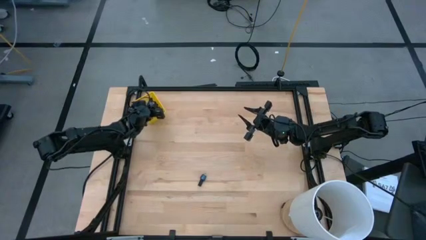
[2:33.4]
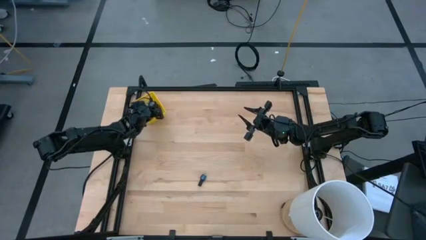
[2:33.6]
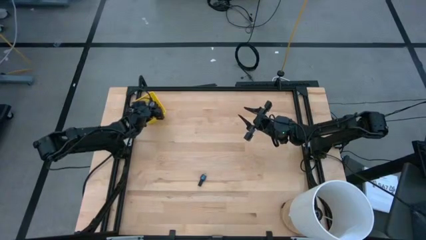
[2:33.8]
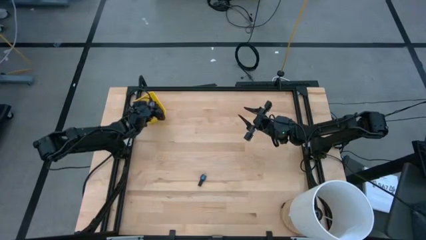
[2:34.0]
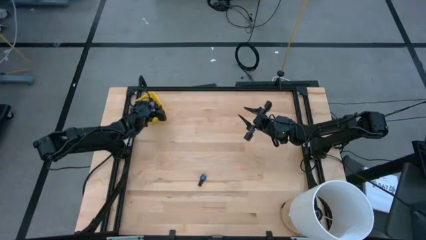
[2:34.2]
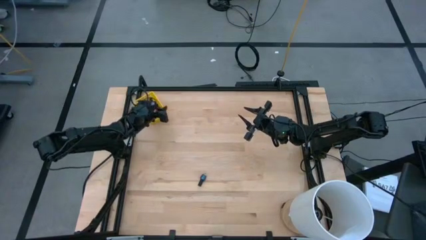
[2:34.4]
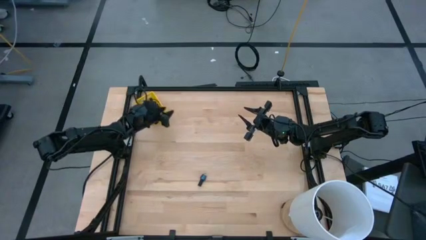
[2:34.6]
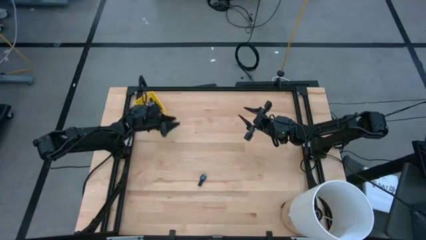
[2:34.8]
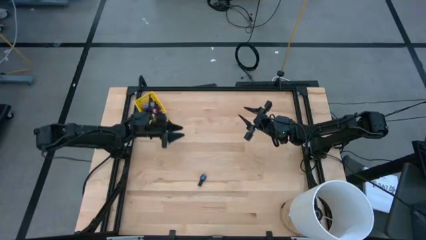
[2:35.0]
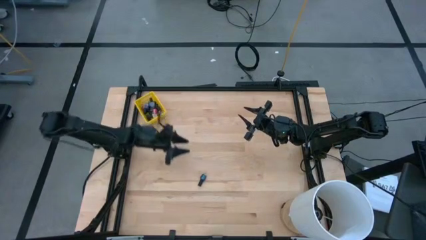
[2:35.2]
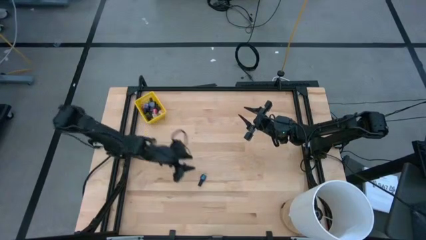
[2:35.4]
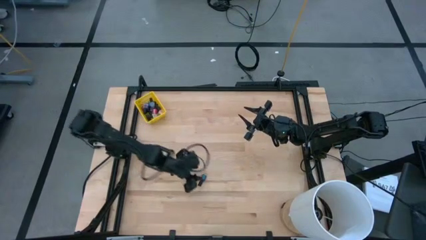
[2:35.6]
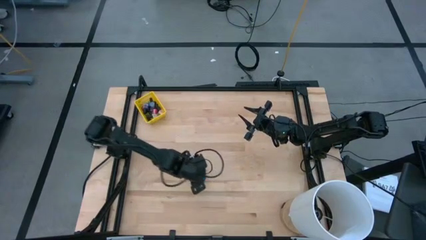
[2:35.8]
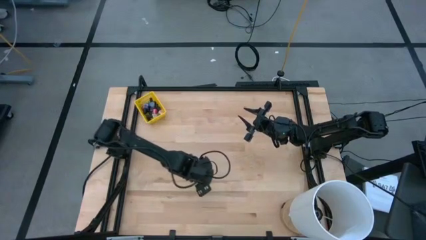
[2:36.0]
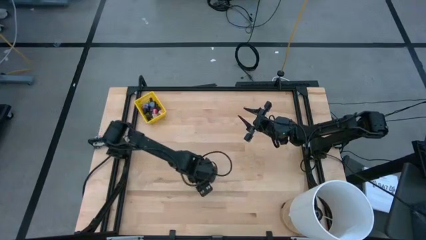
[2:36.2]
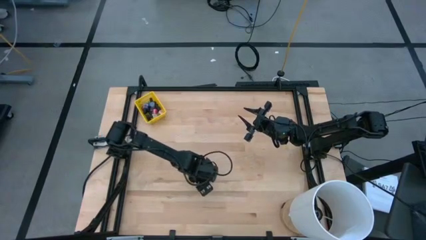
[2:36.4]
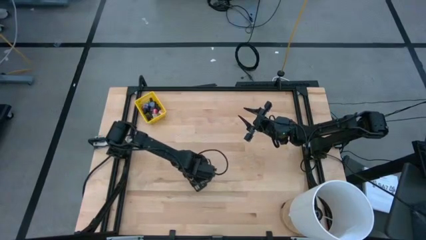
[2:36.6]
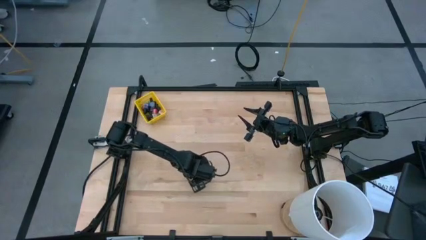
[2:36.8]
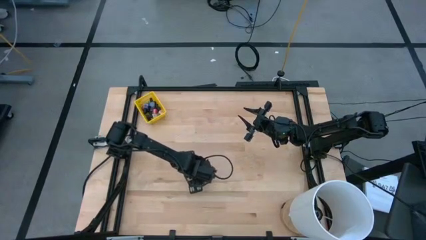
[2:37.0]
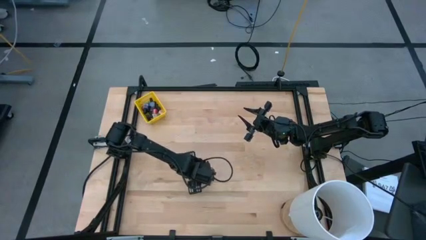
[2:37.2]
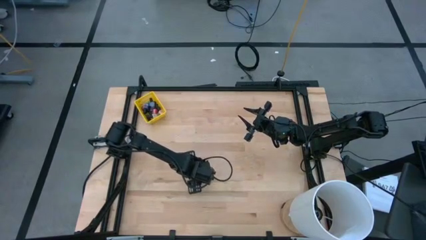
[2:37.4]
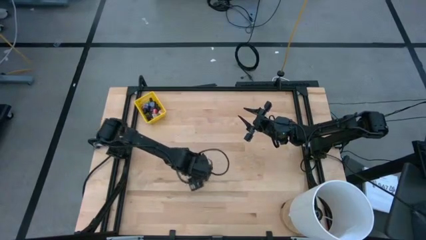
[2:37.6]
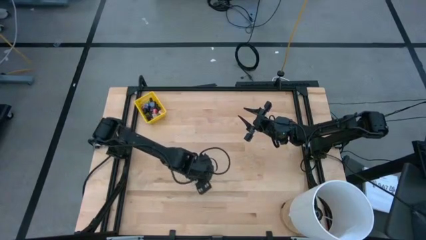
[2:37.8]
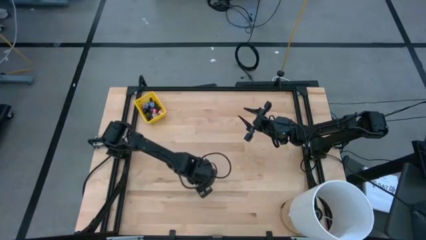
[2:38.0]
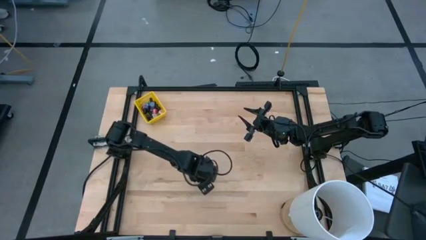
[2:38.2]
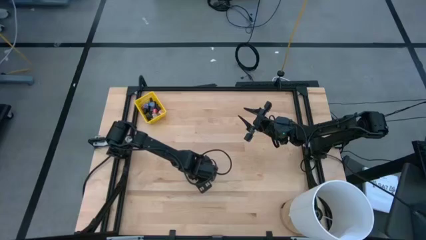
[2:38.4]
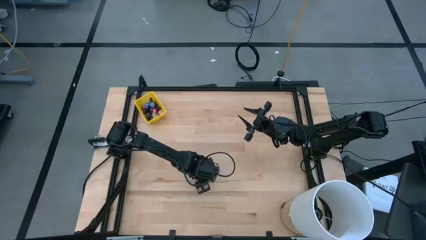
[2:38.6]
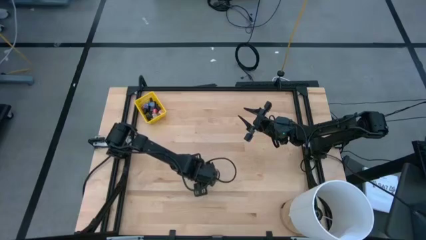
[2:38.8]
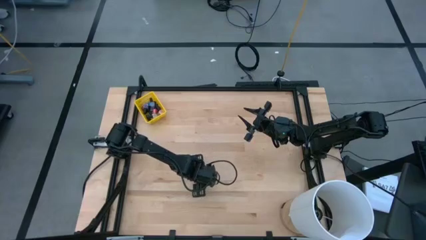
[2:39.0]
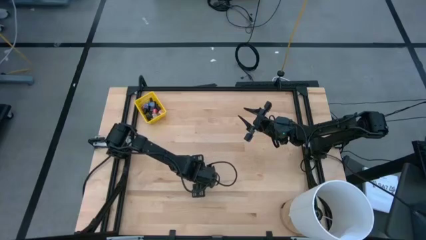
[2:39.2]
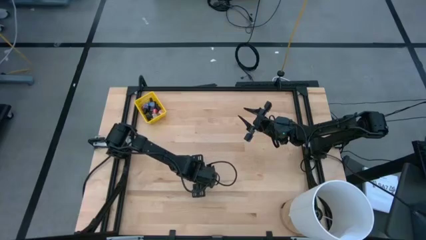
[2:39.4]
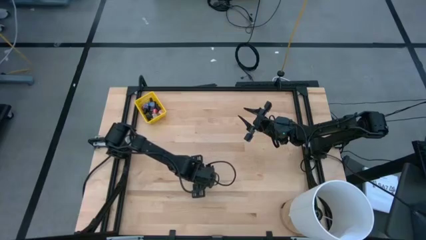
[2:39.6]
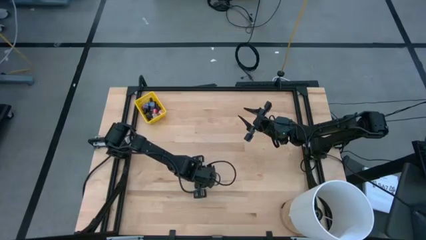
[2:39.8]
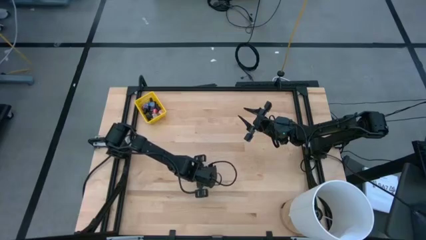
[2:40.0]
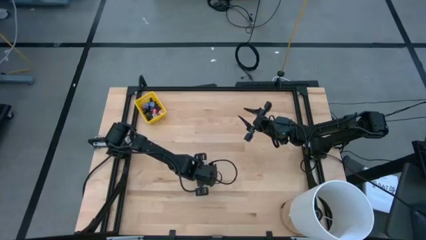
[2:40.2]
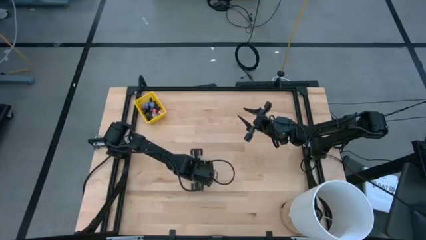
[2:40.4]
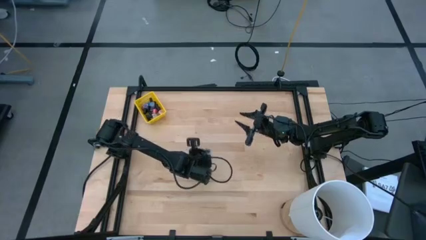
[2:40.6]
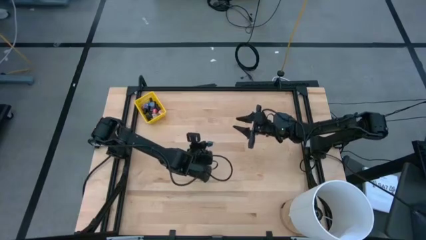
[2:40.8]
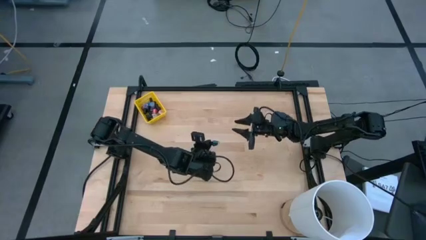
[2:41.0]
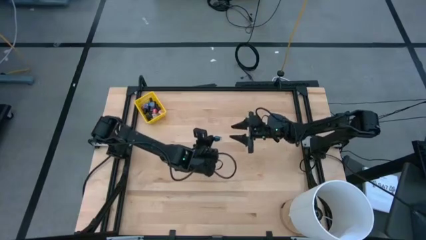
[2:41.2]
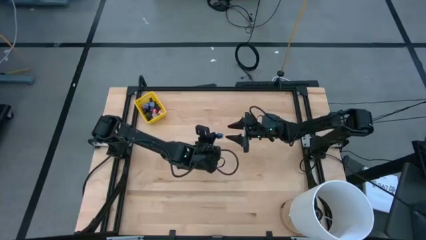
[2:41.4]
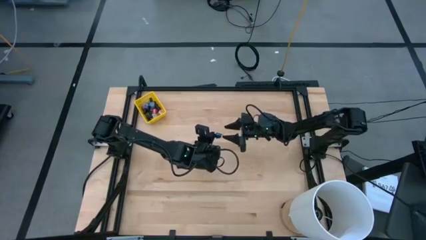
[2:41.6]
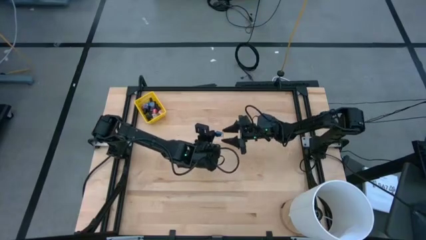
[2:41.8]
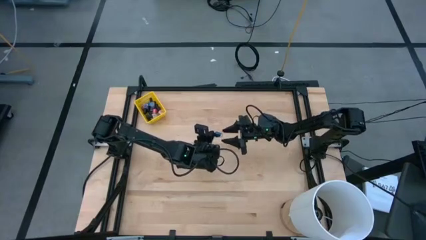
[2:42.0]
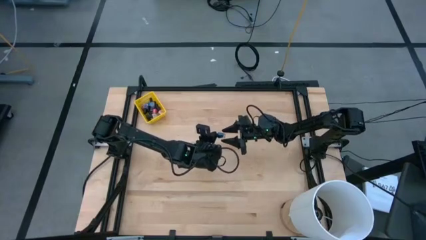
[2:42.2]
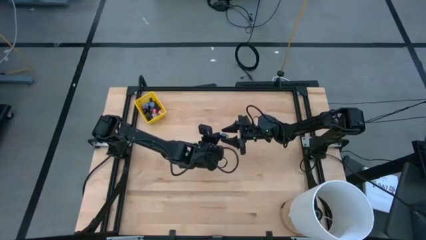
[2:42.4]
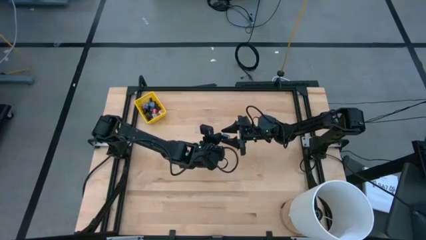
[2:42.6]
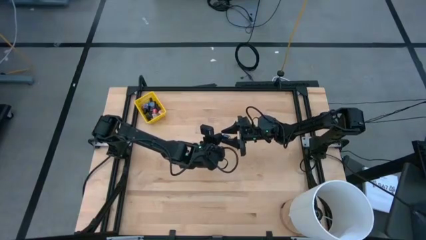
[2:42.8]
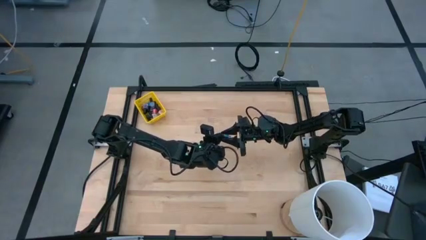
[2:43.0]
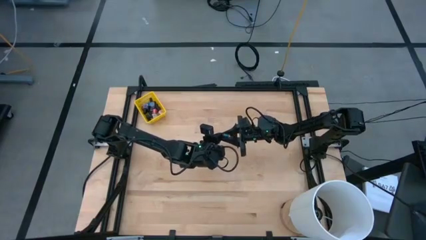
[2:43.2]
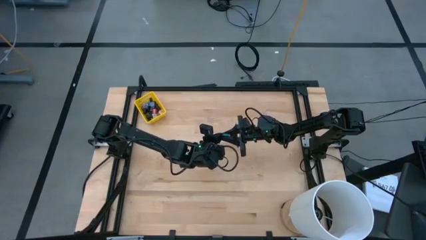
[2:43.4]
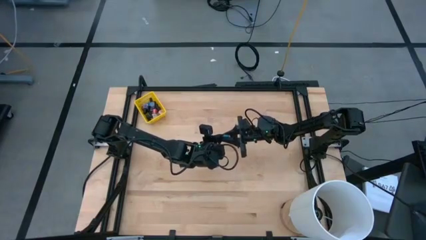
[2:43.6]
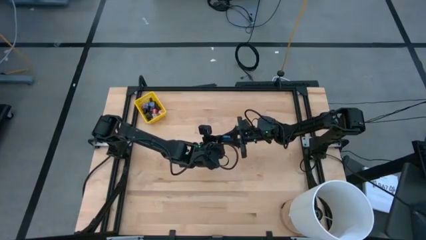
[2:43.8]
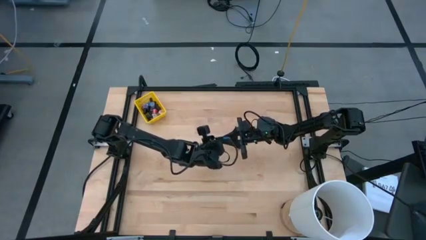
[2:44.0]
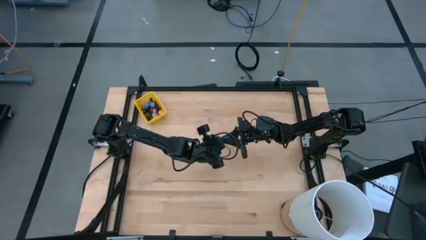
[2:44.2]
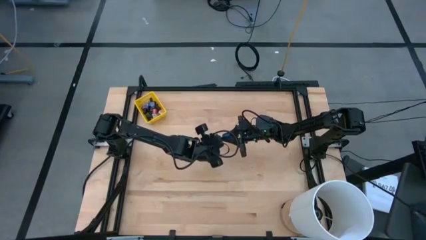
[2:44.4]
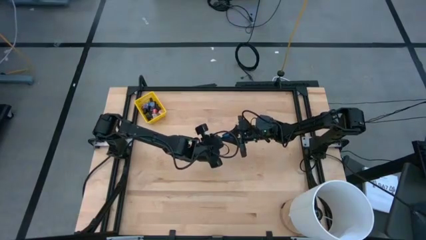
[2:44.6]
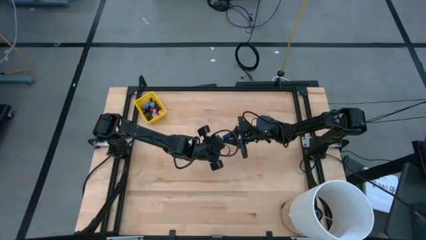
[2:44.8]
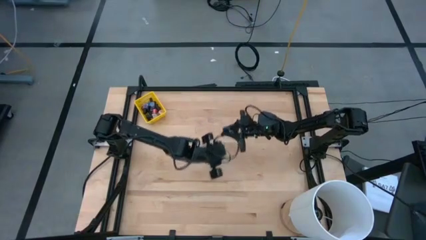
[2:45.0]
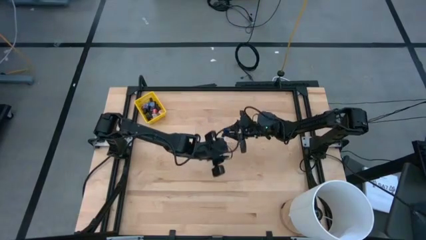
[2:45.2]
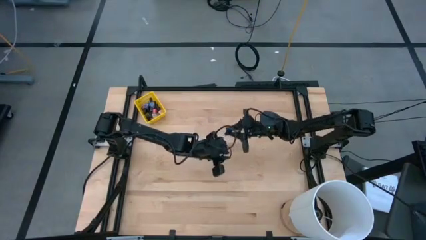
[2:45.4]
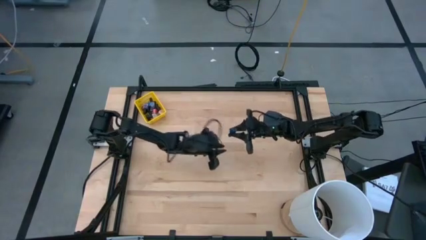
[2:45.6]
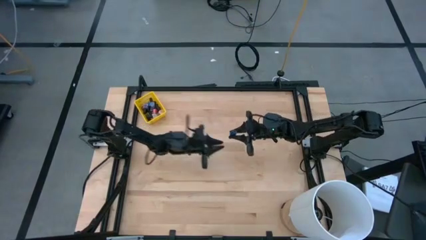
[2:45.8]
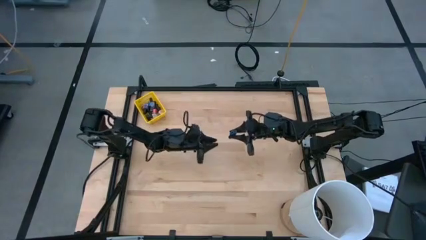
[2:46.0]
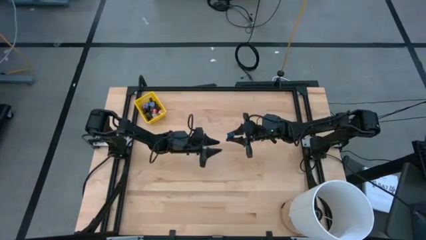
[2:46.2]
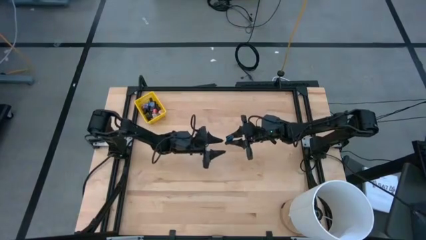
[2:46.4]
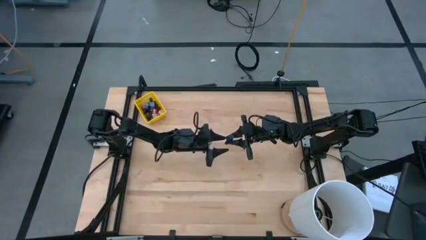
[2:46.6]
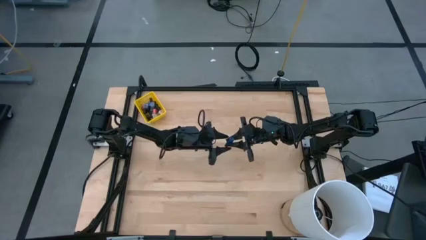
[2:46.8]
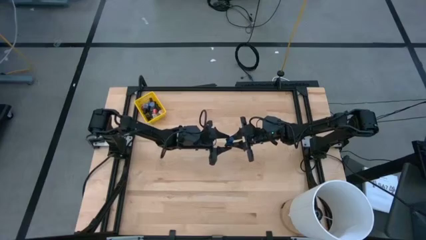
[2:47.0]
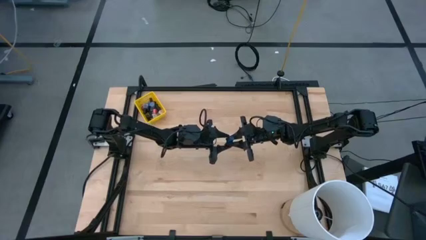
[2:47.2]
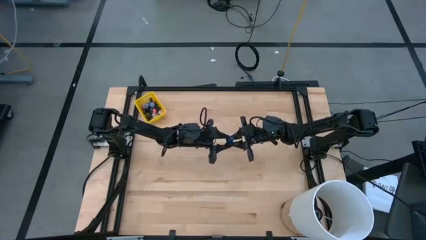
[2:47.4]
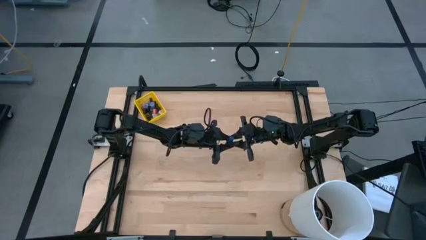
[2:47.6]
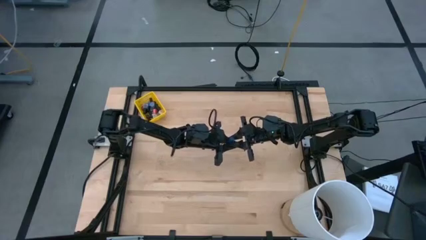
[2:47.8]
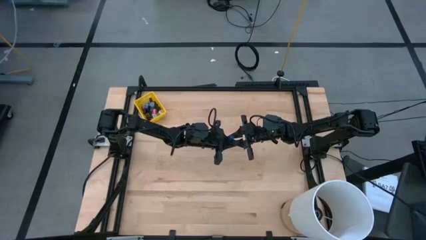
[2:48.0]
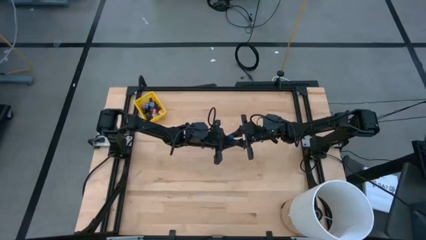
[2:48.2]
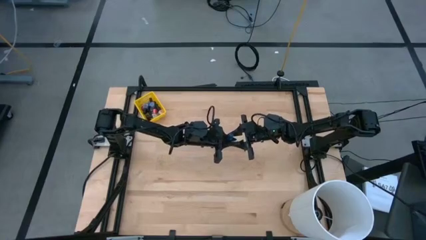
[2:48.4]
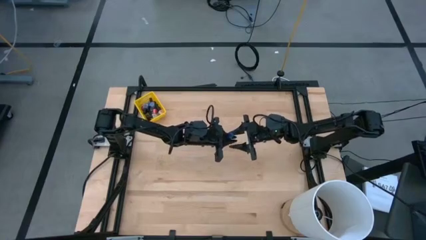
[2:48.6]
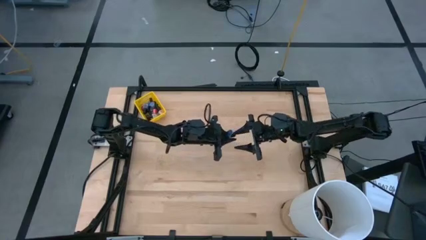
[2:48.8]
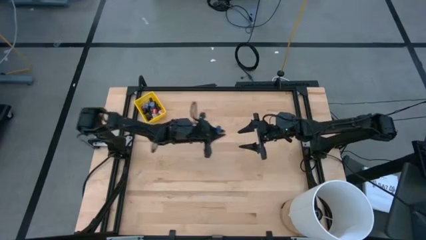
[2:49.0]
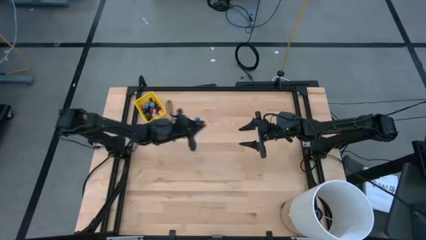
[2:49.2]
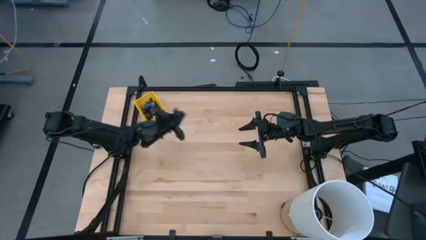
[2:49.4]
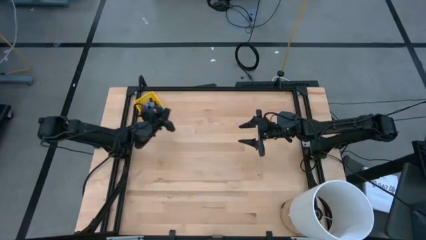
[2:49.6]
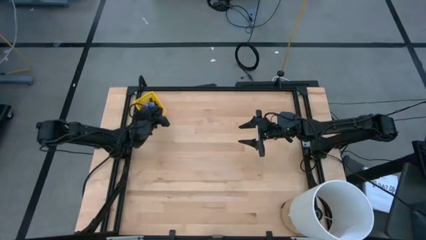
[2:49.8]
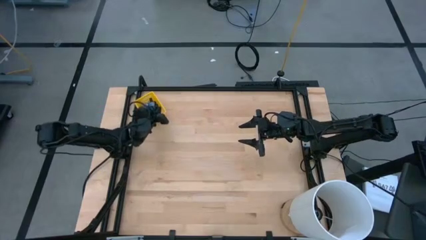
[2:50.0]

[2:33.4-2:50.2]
Task: Pick & Place Nail Polish
Put the dark blue nail polish into the yellow bin
